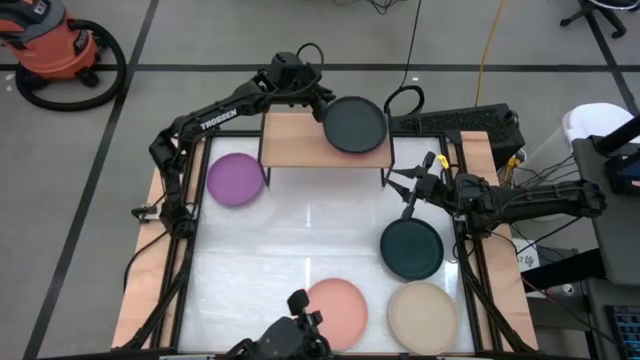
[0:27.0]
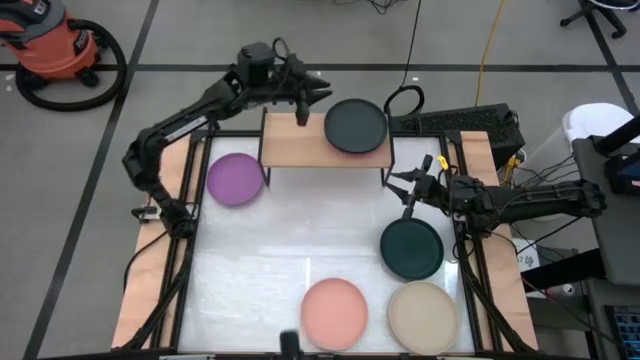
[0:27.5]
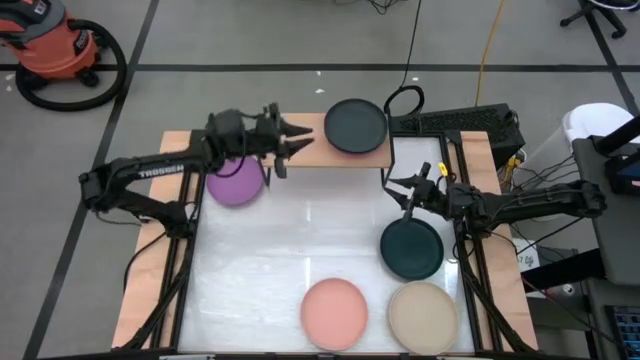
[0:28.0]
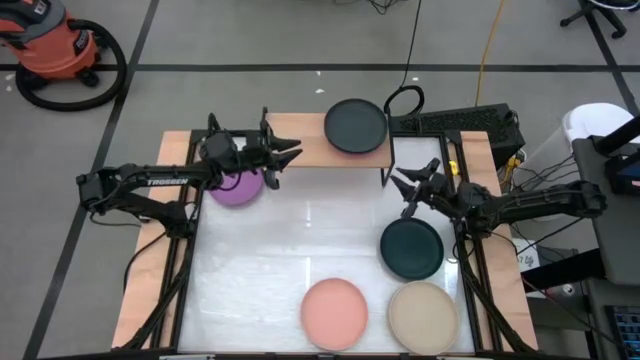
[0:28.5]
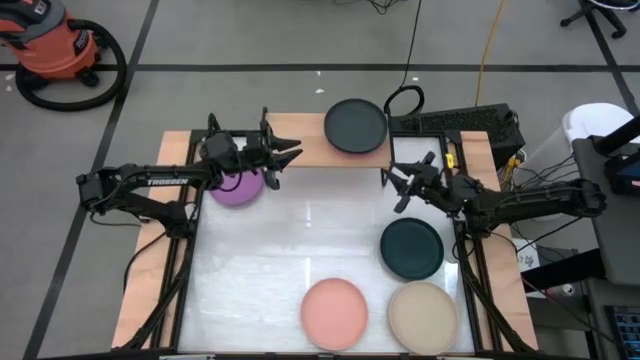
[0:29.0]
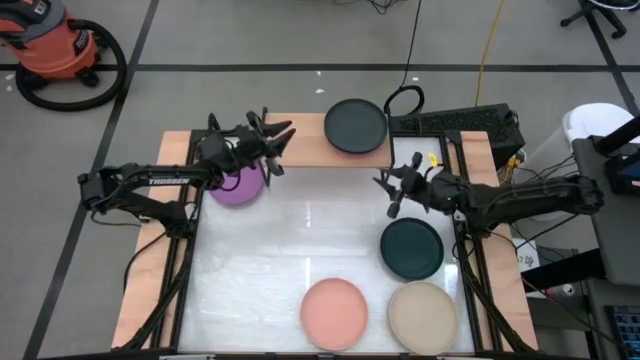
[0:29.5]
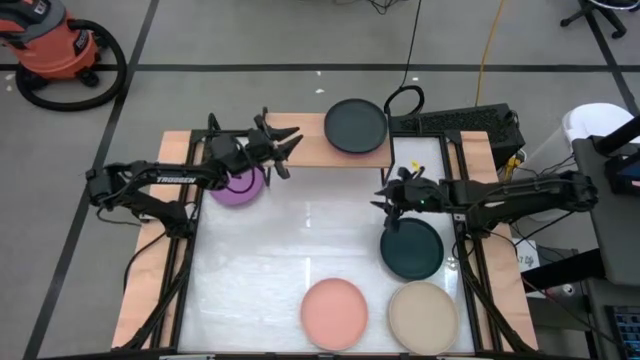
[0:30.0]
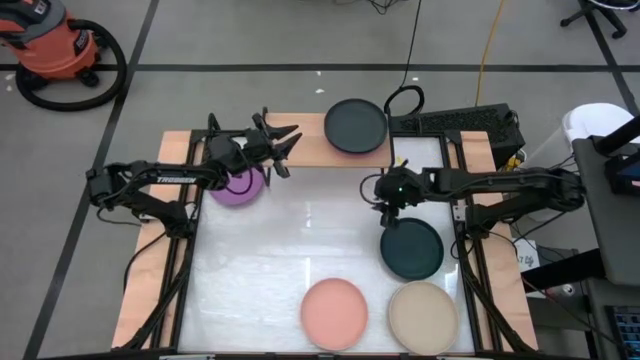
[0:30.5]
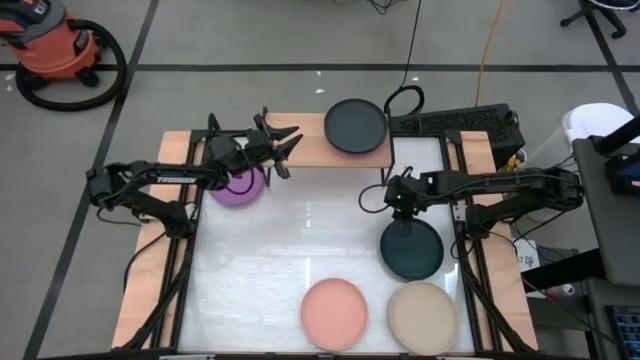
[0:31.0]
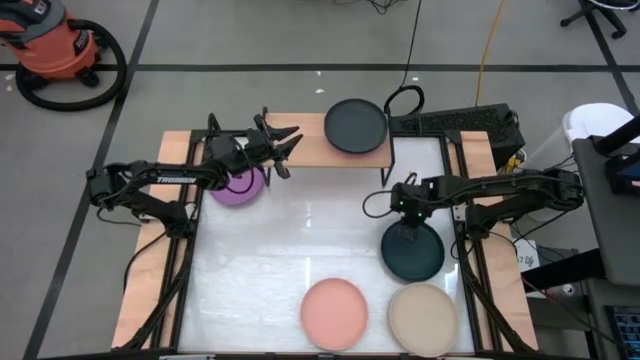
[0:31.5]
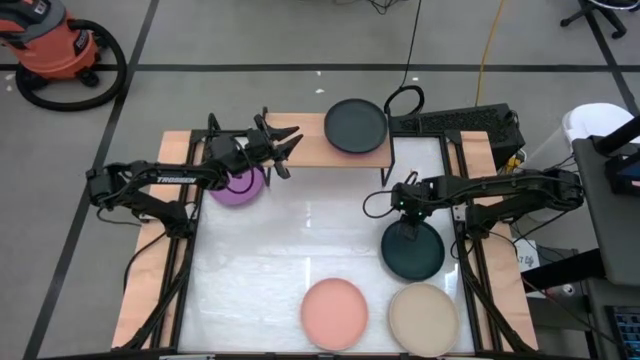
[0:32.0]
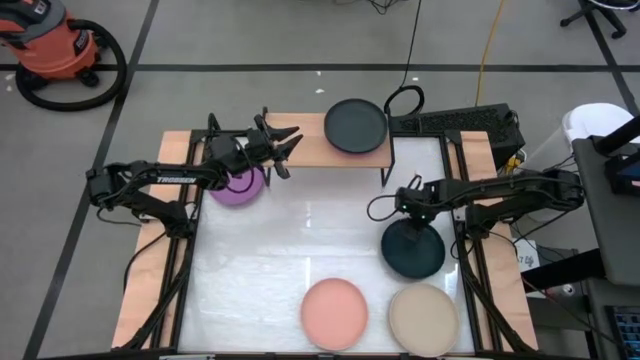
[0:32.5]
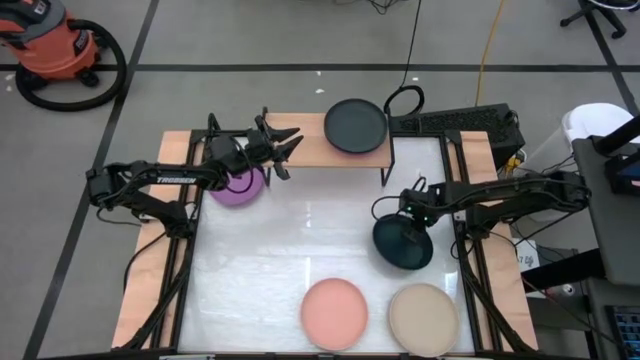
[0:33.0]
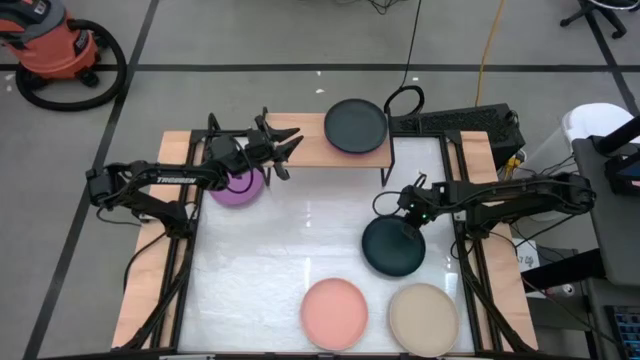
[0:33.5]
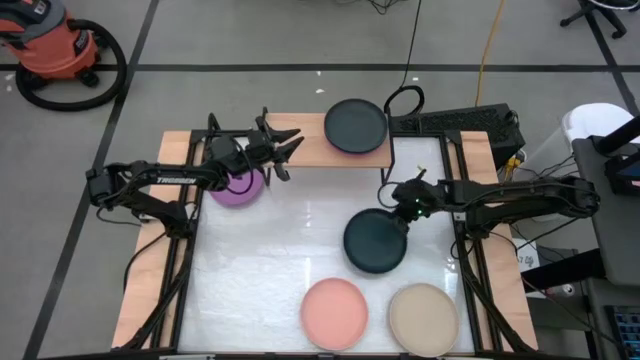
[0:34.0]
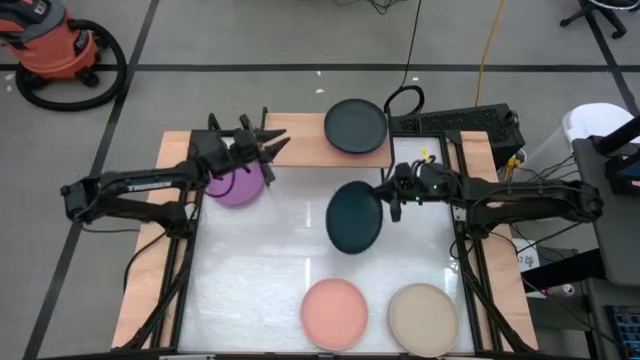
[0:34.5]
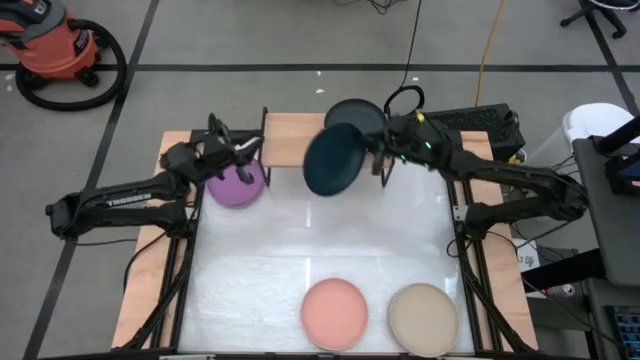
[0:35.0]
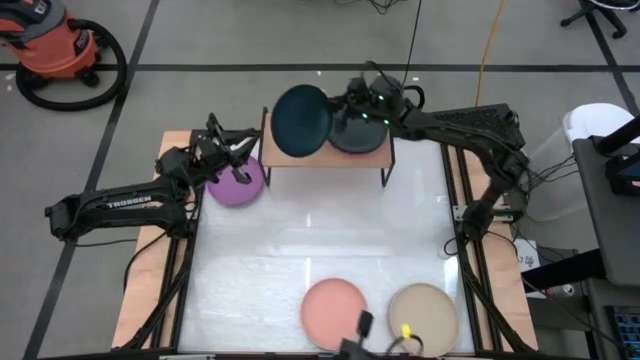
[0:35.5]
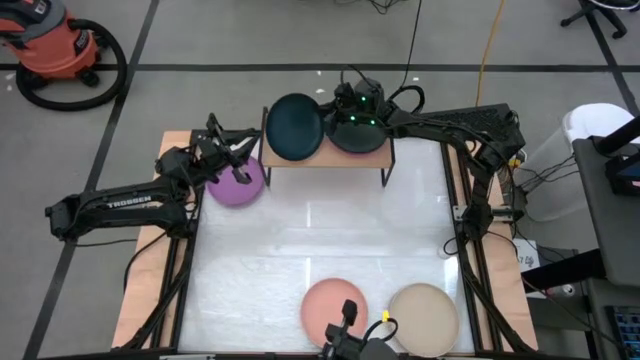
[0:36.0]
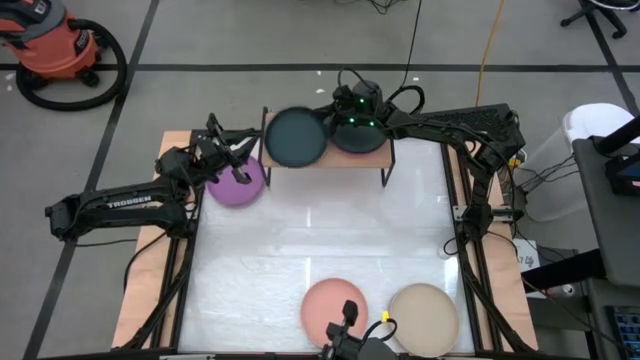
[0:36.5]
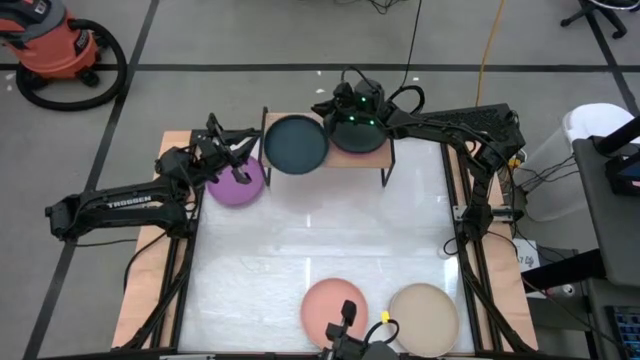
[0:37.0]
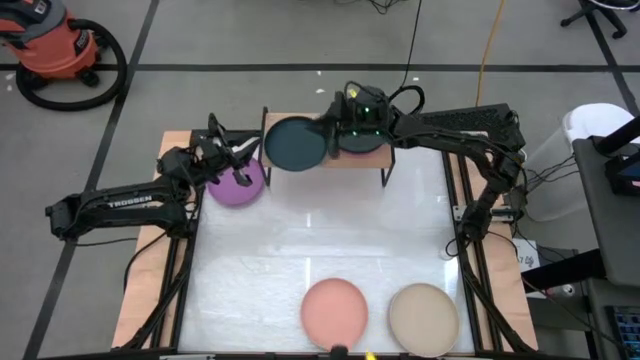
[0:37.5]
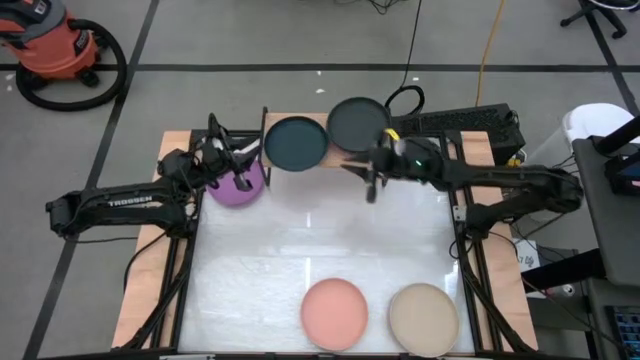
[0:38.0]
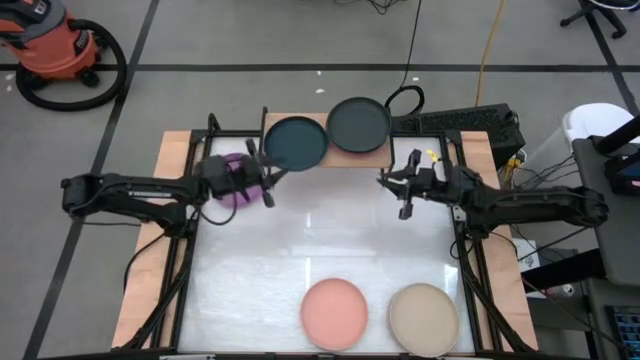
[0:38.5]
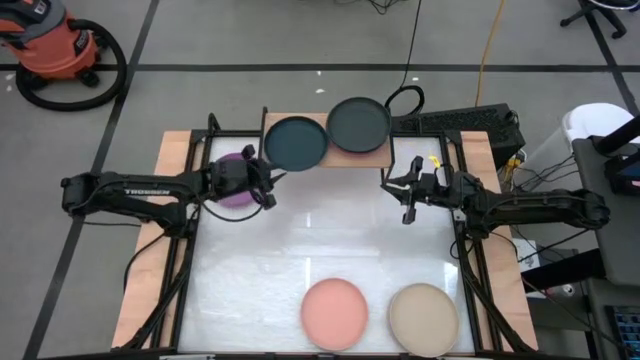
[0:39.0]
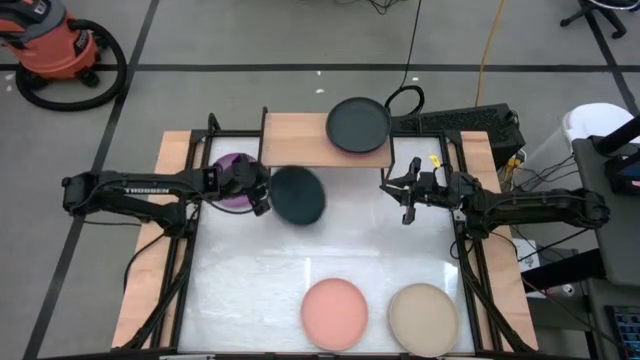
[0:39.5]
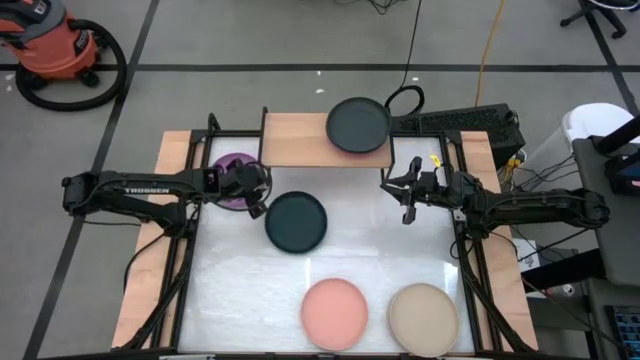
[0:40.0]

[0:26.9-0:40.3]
Task: Place and stack plates onto a shelf
Put the dark green plate on the shelf

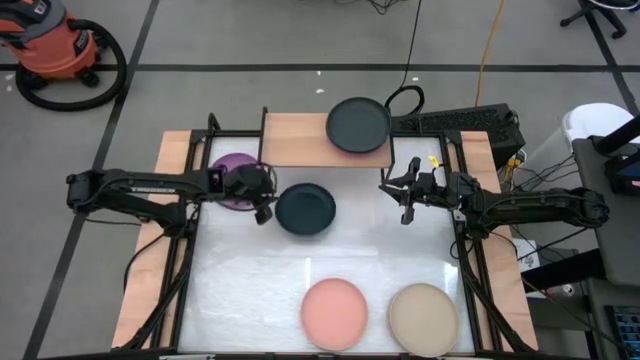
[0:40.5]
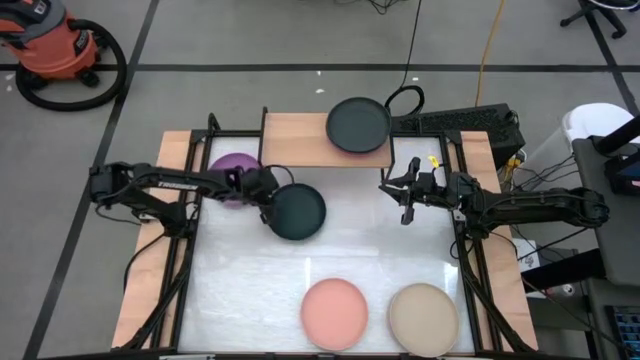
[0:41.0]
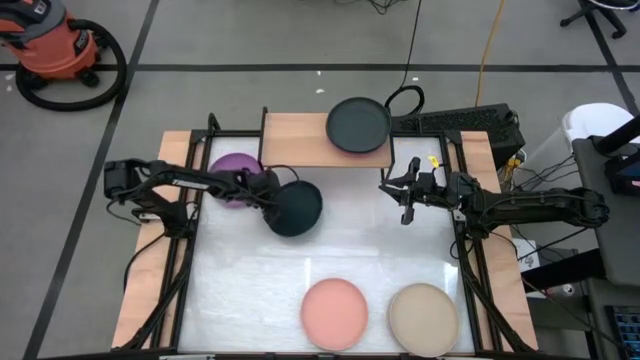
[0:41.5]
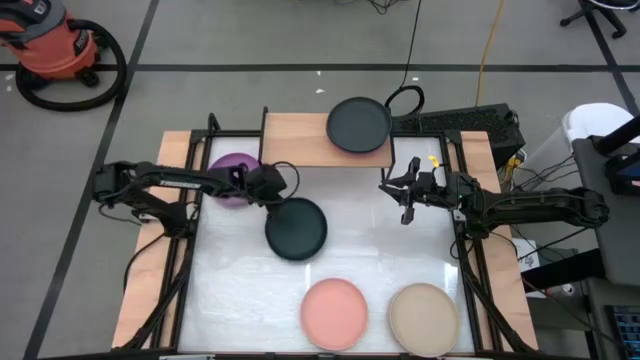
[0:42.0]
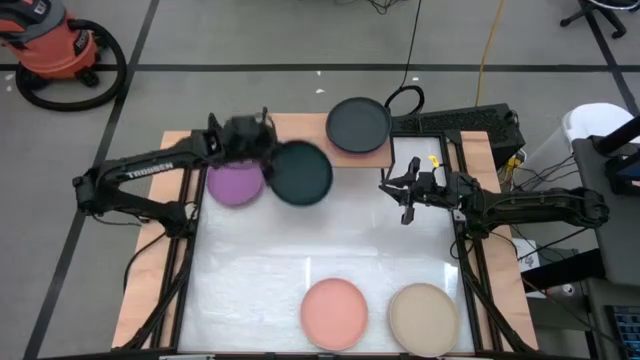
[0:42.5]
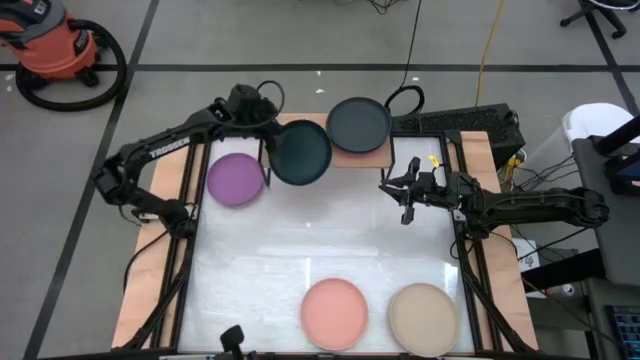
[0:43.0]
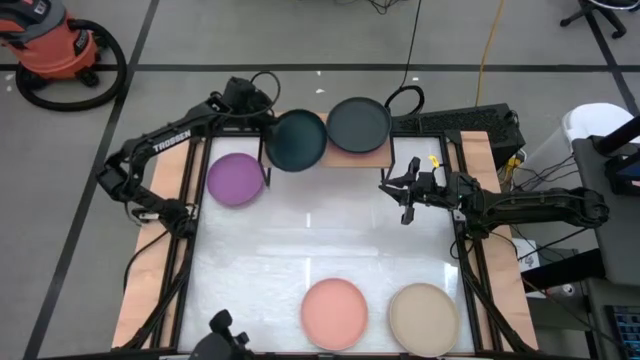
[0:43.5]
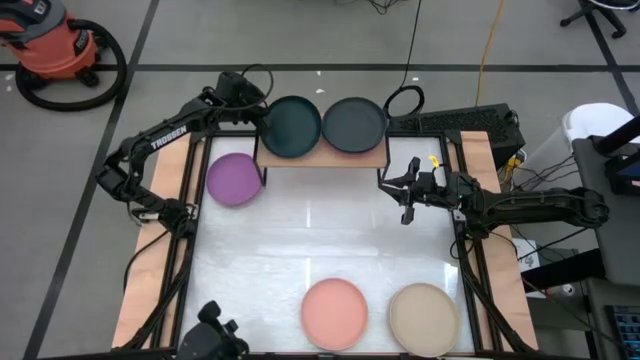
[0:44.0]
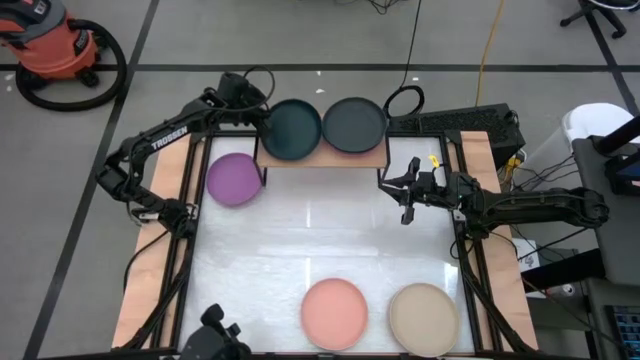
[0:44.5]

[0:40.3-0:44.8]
Put the dark green plate on the shelf

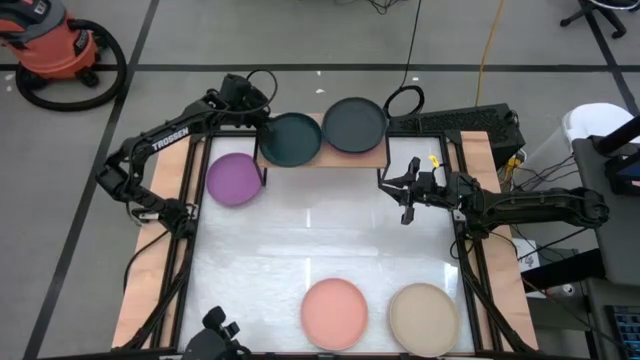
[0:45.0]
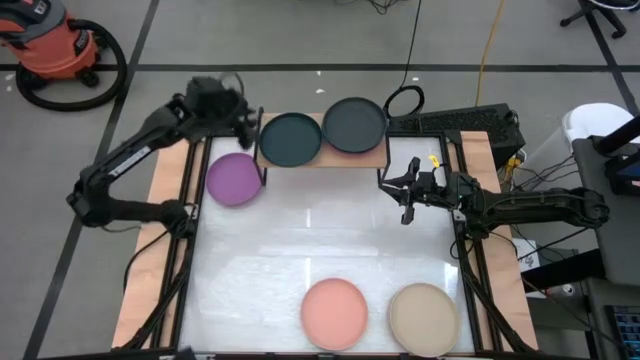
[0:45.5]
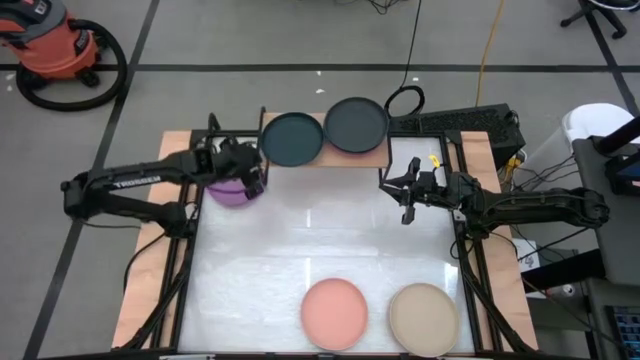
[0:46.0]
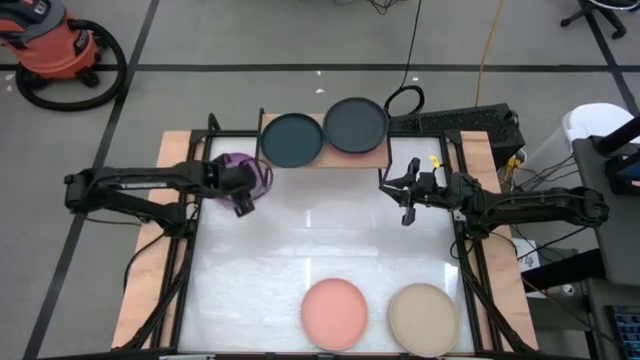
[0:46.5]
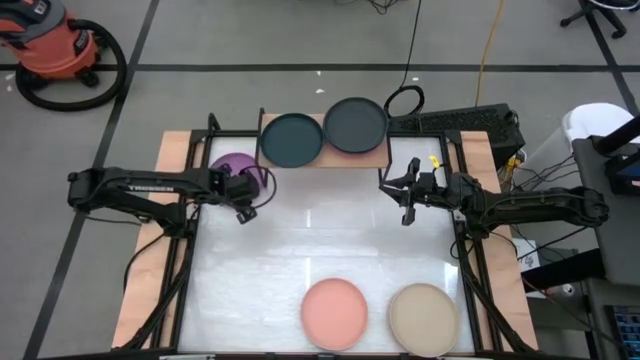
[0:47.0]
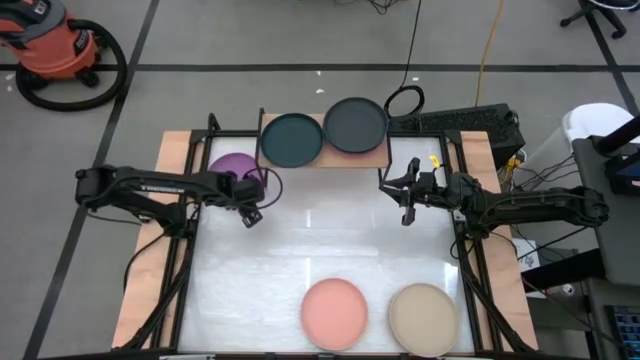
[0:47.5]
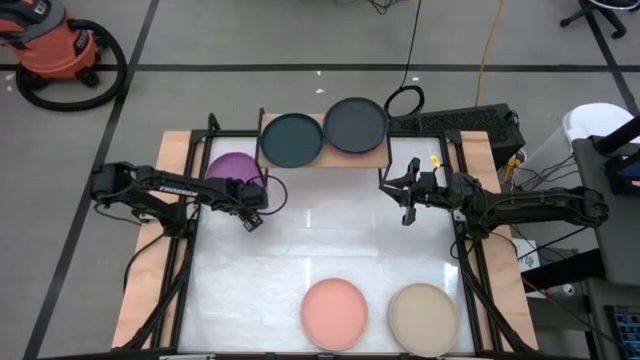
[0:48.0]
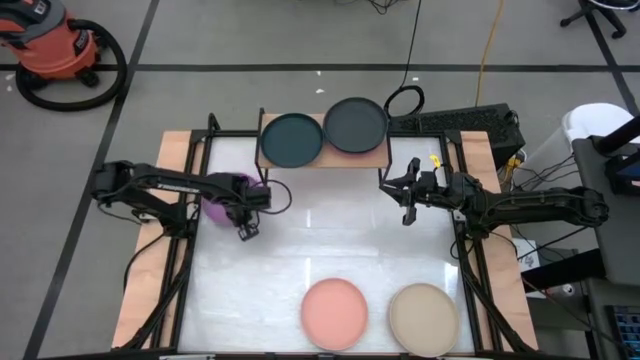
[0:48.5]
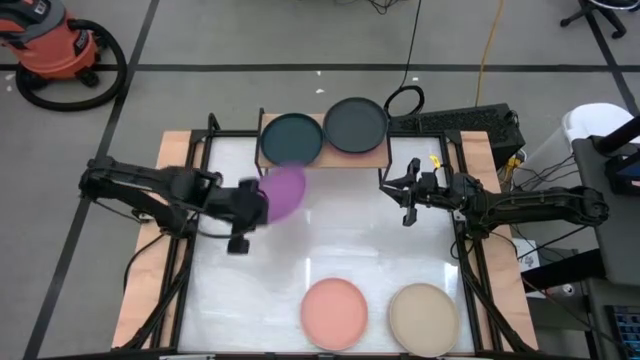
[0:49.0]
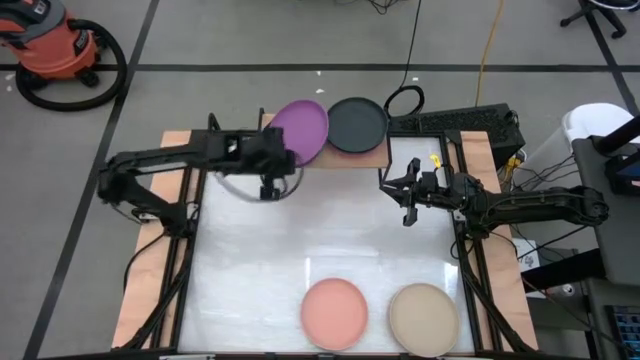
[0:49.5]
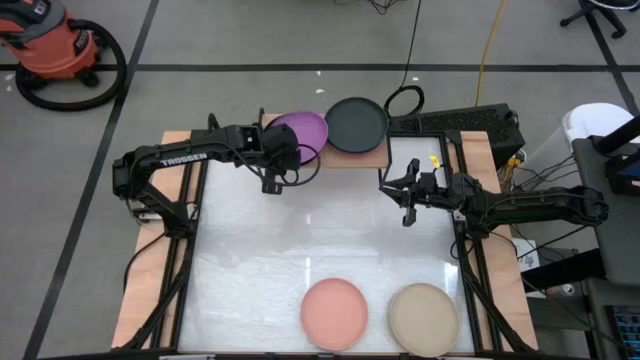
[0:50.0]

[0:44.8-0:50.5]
Stack the purple plate on top of the dark green plate on the shelf
